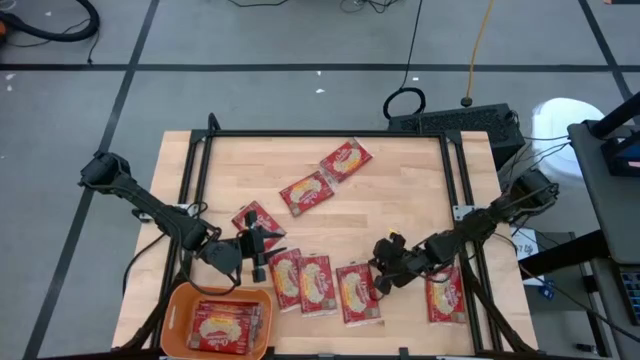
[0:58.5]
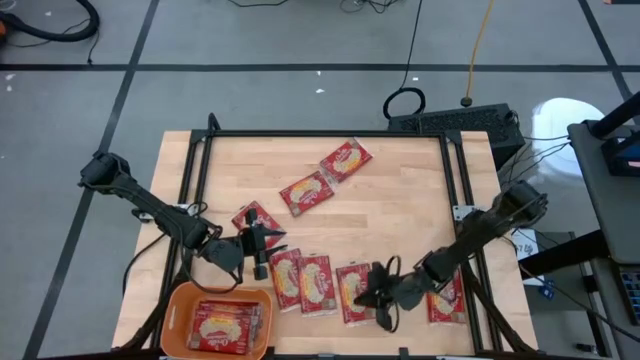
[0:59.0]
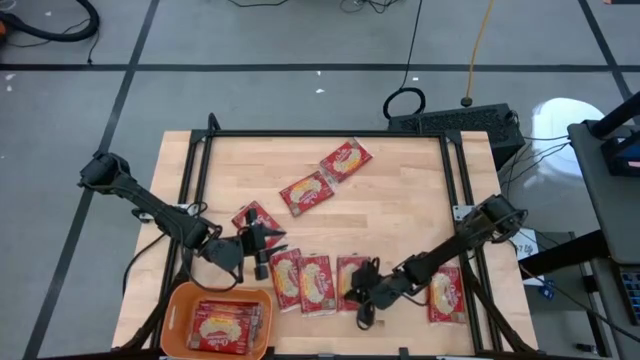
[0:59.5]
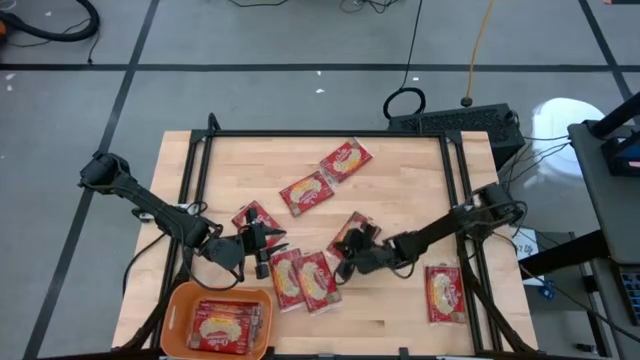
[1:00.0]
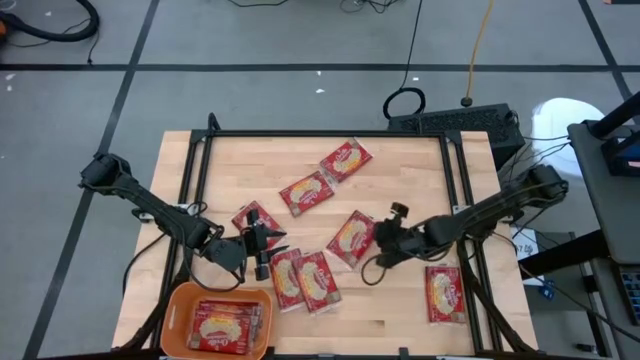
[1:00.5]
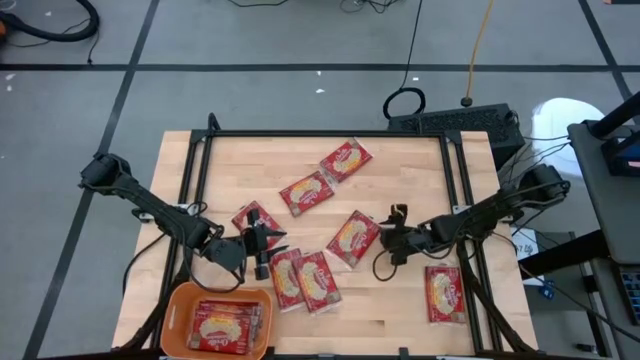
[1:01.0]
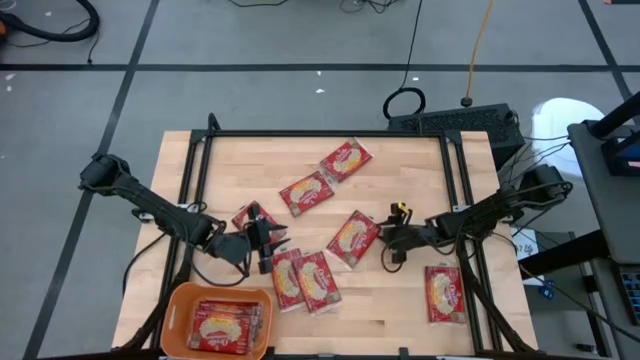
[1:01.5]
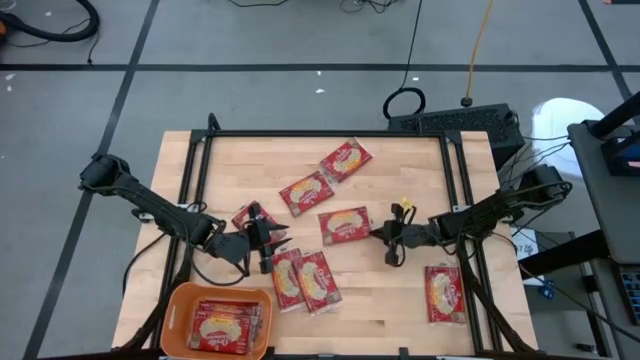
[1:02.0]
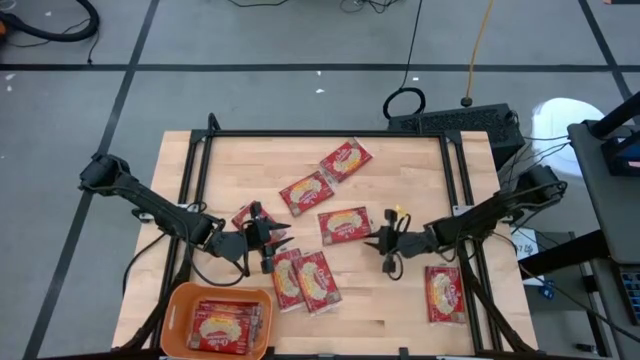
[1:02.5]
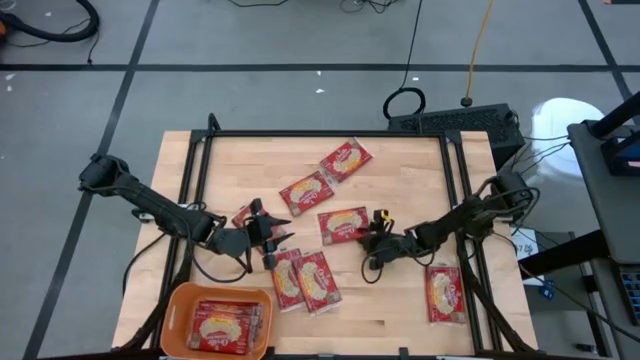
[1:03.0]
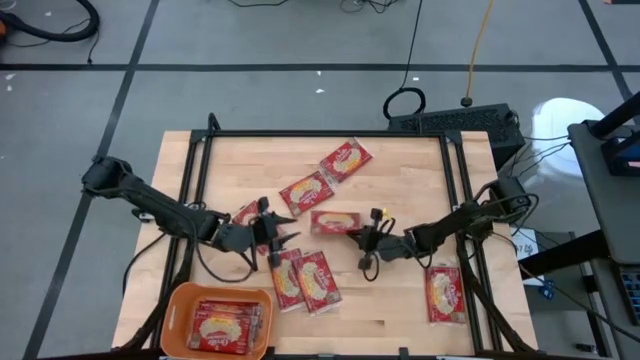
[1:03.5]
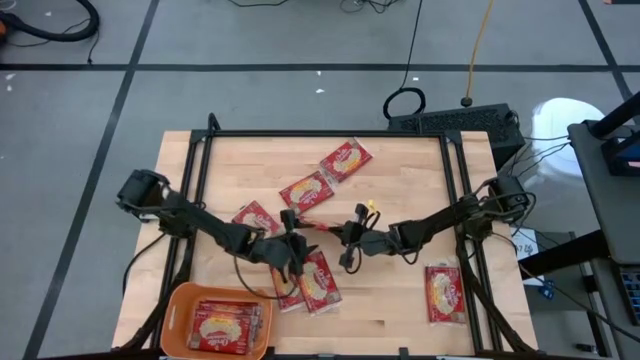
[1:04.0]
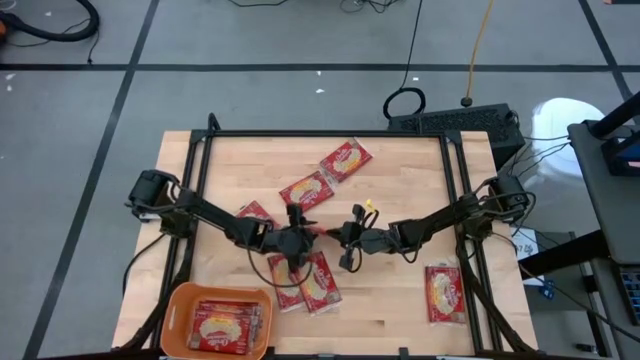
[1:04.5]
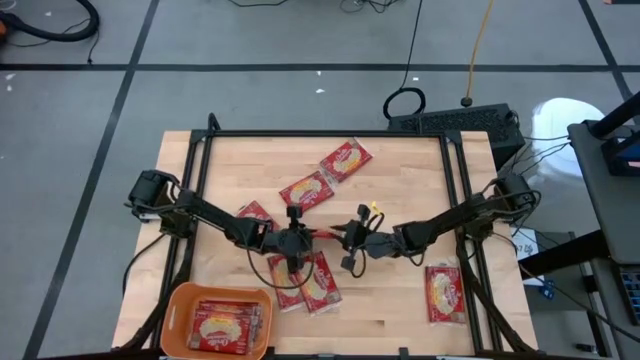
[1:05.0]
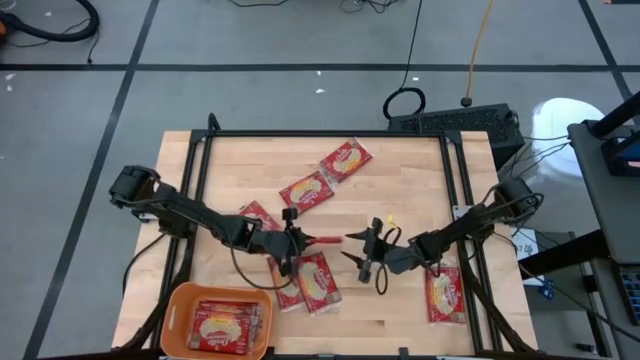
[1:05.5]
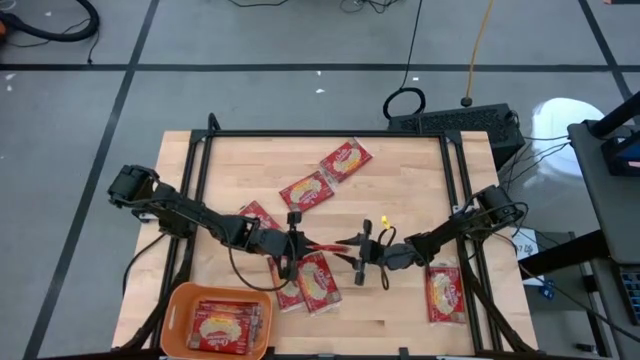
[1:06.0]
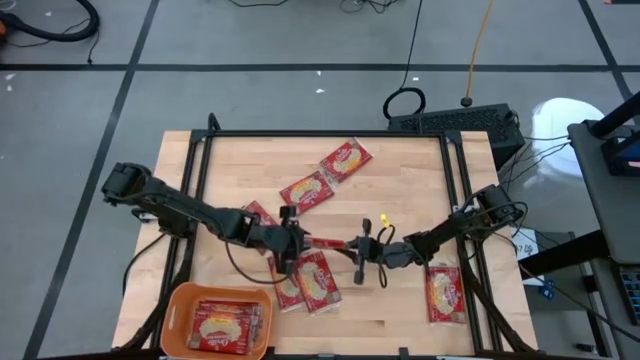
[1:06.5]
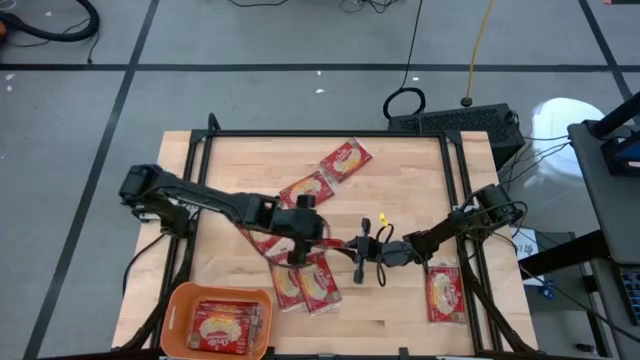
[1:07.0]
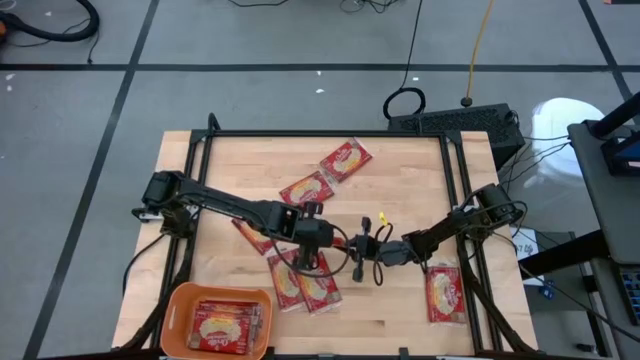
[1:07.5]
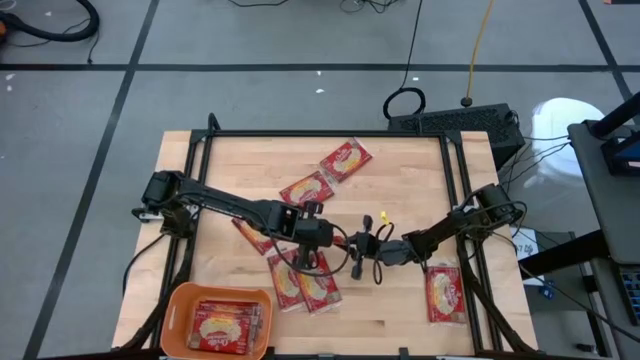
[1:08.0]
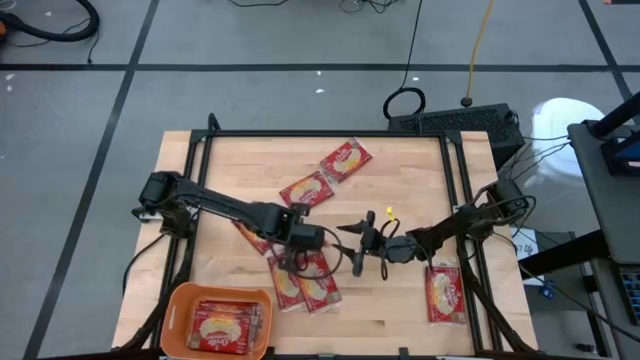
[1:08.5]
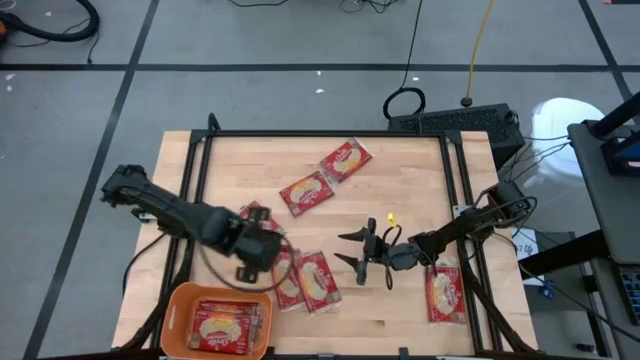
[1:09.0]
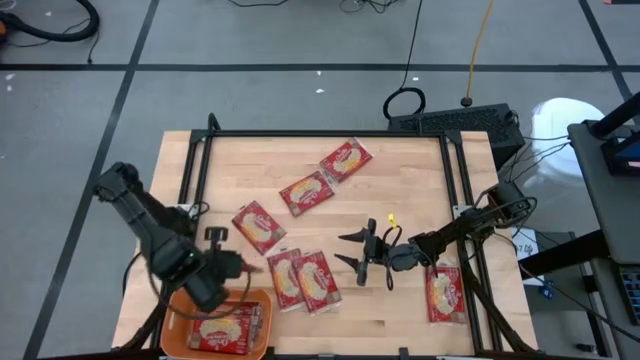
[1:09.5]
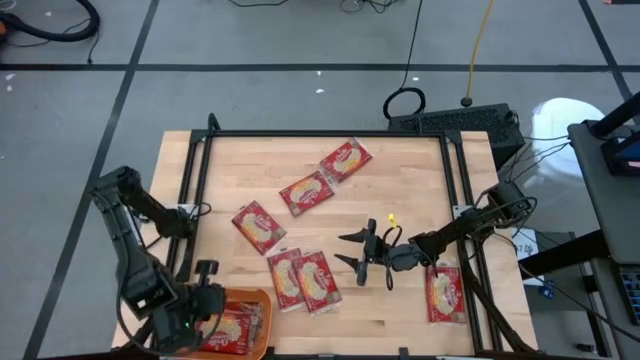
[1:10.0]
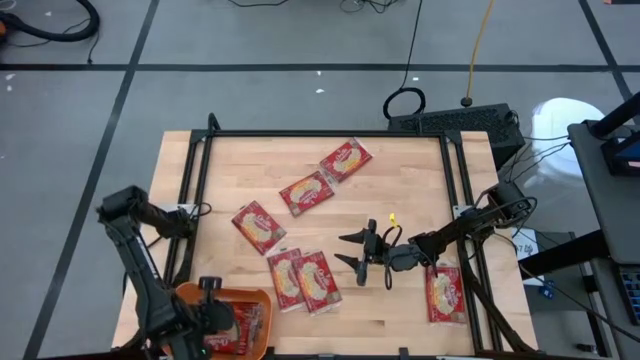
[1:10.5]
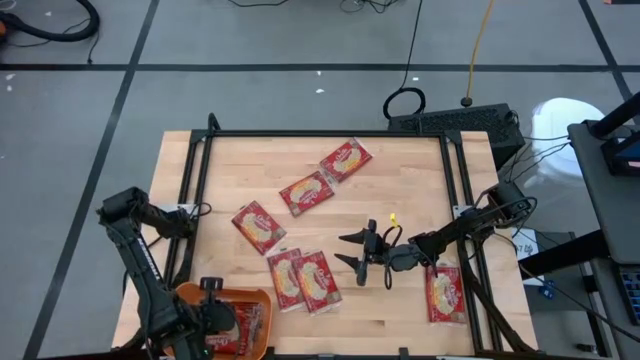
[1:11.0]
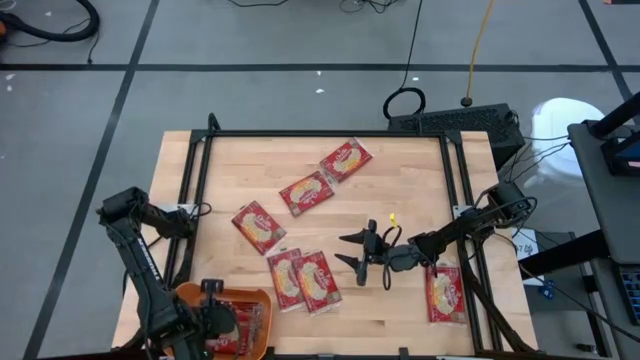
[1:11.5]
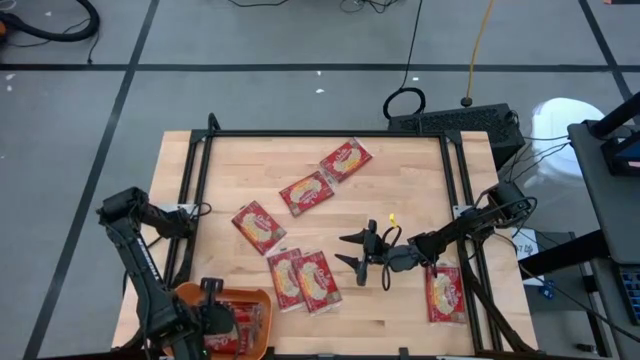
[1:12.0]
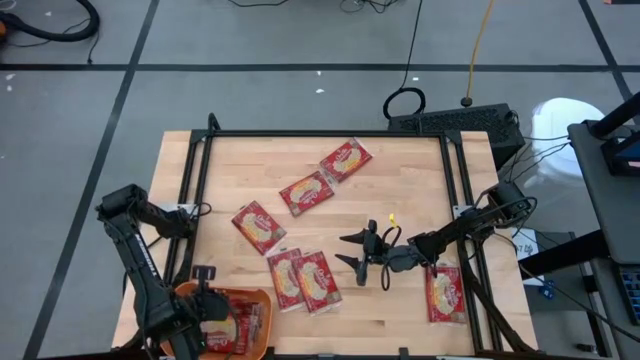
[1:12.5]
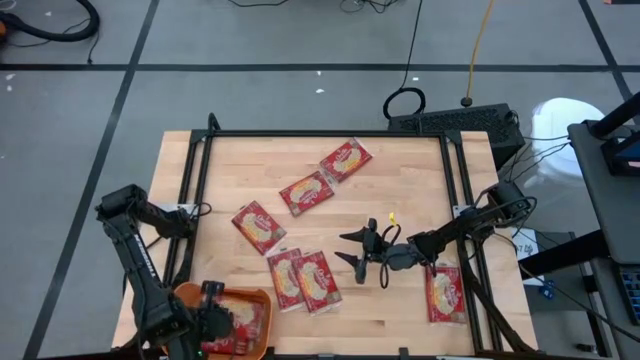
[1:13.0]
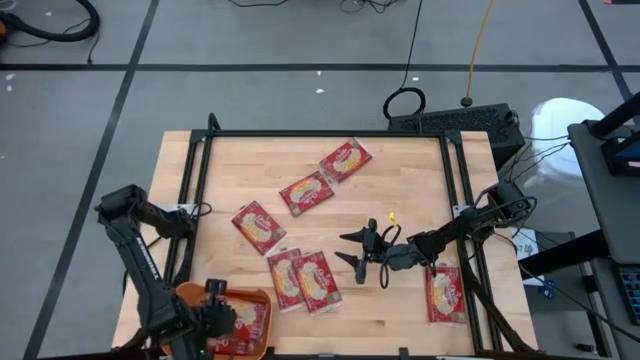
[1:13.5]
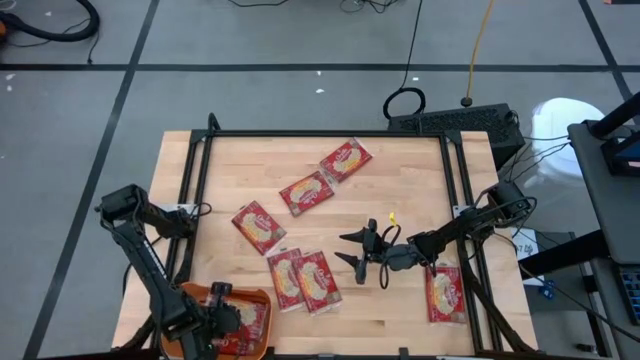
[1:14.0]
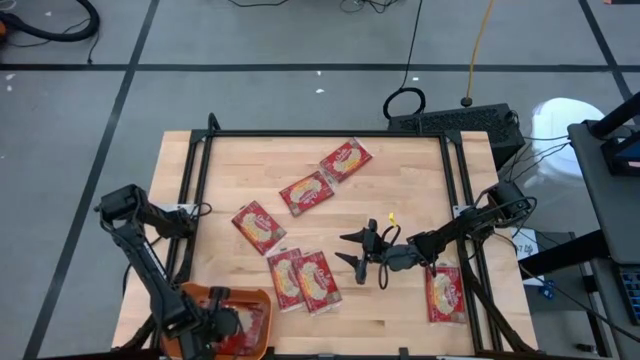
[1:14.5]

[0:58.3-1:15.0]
Task: Sort popcorn bags into baskets
Put the popcorn bag into the orange bin

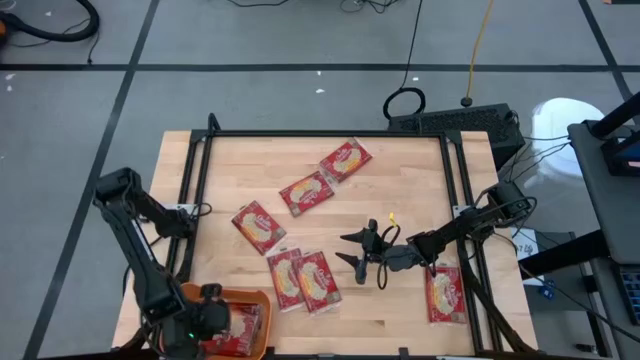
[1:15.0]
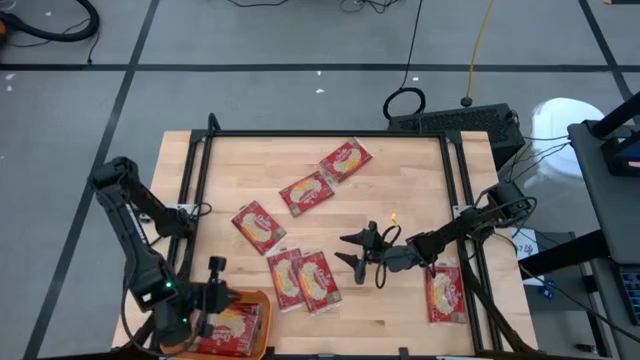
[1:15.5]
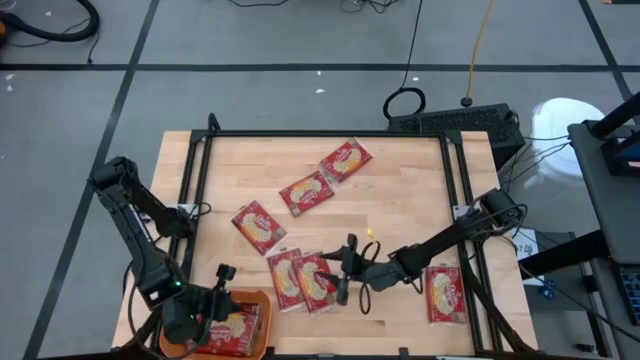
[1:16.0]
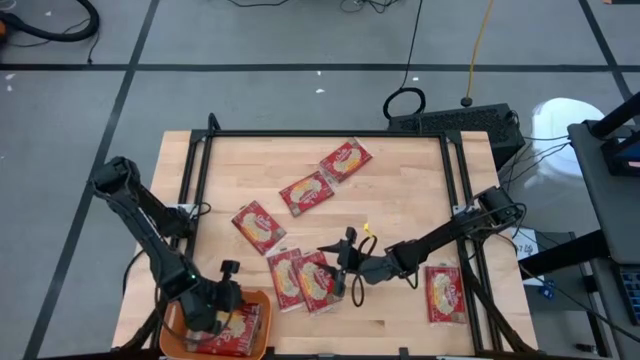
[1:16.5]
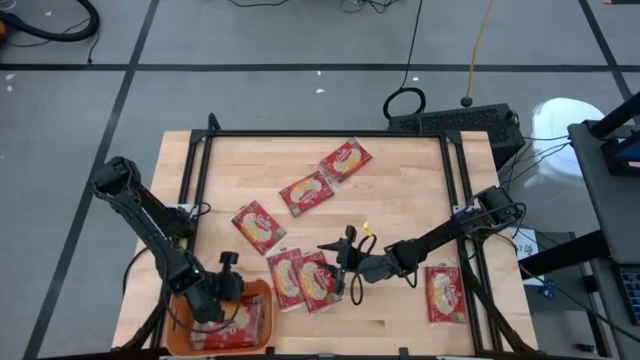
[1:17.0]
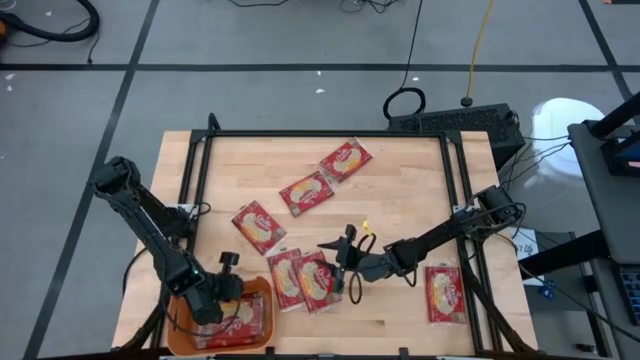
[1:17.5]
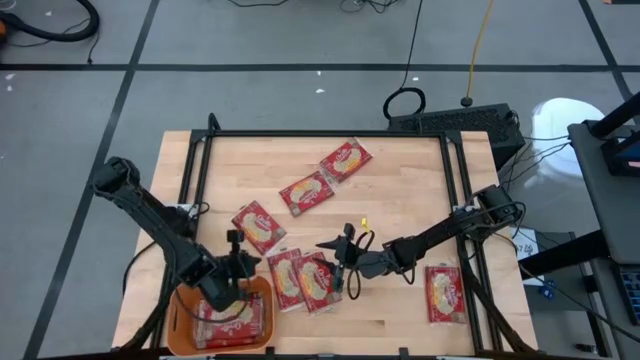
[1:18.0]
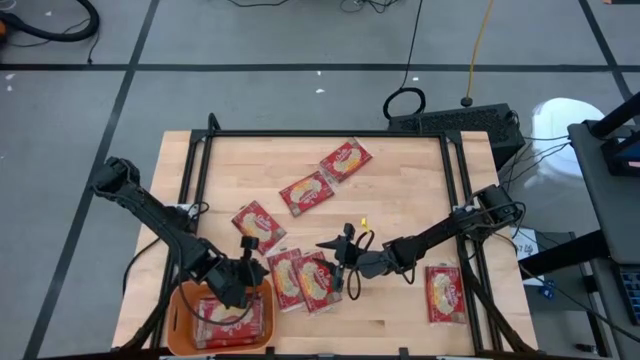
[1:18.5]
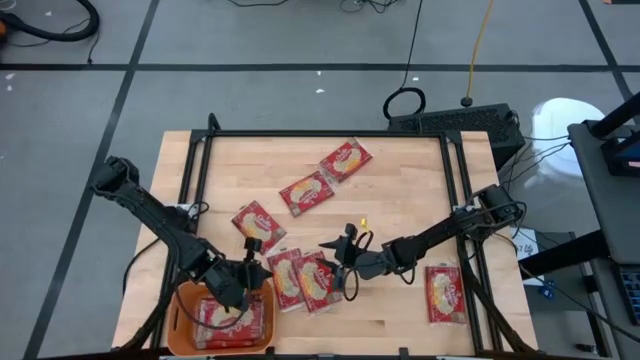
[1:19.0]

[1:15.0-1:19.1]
Adjust the orange bin
